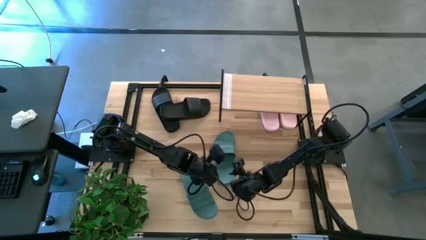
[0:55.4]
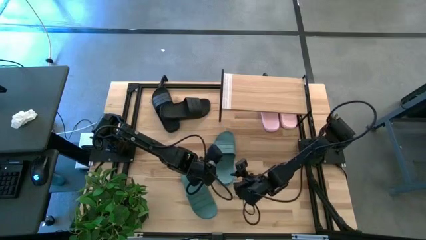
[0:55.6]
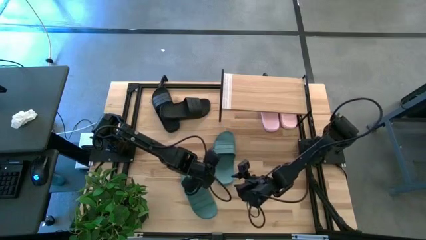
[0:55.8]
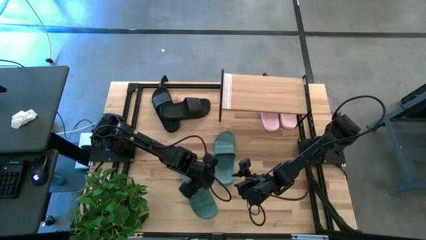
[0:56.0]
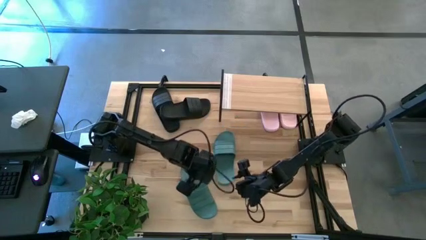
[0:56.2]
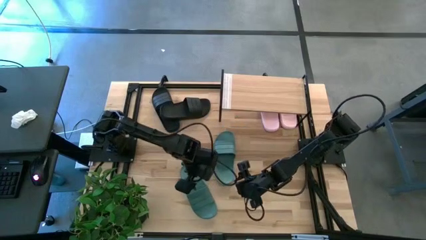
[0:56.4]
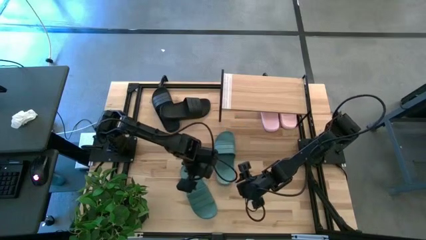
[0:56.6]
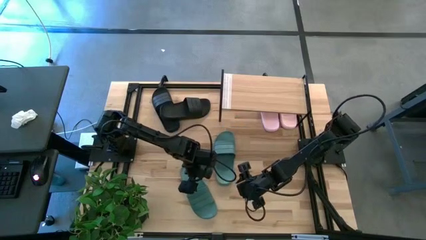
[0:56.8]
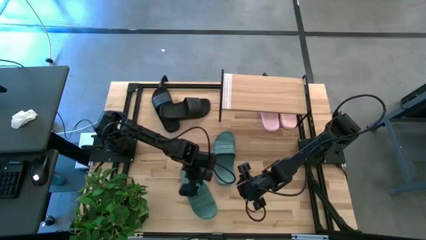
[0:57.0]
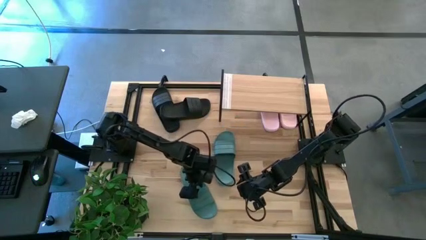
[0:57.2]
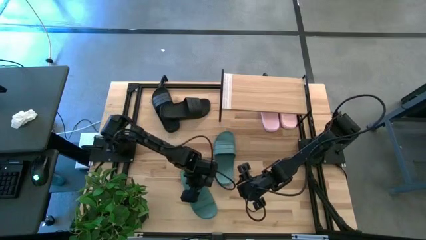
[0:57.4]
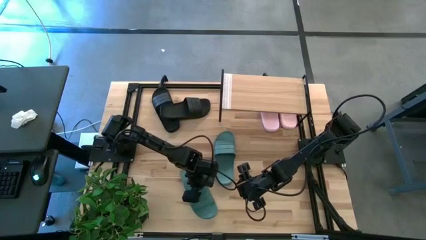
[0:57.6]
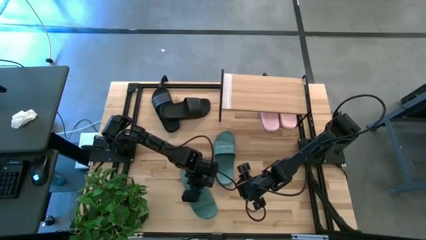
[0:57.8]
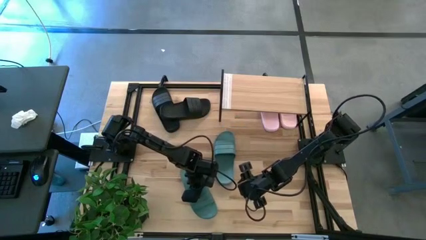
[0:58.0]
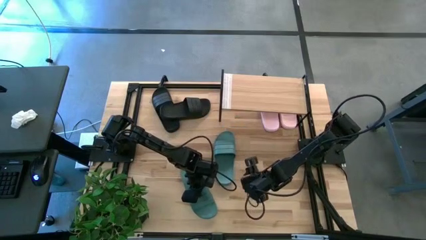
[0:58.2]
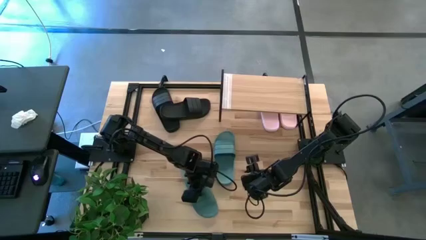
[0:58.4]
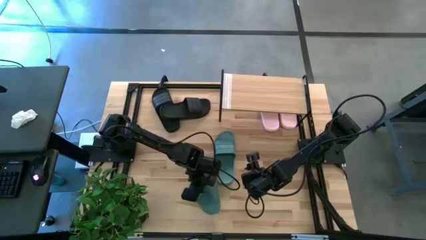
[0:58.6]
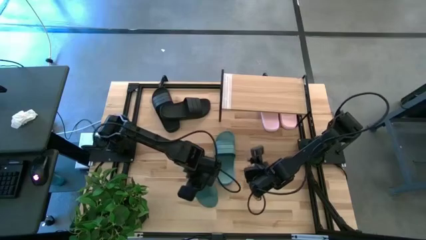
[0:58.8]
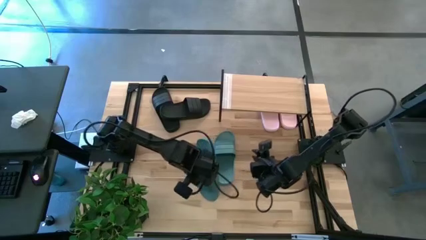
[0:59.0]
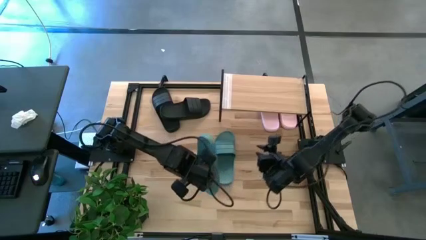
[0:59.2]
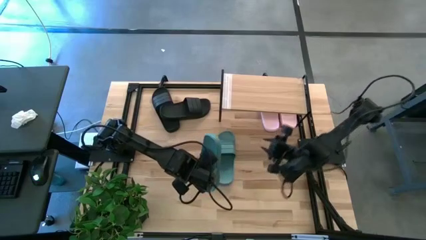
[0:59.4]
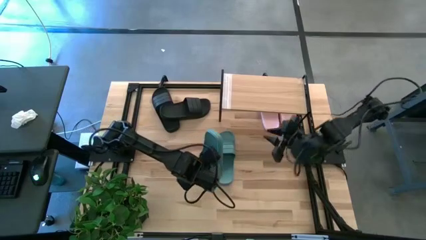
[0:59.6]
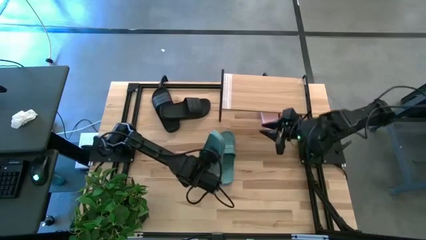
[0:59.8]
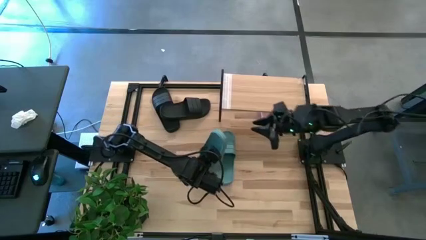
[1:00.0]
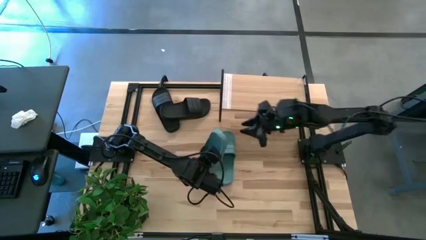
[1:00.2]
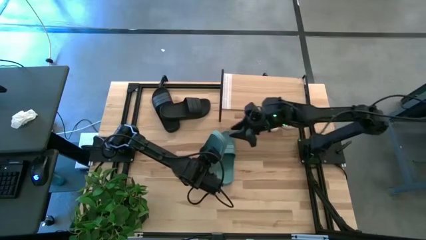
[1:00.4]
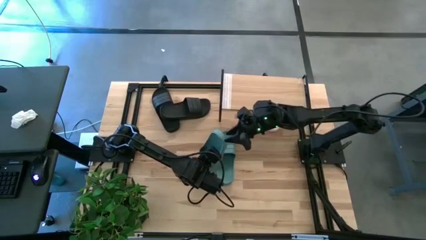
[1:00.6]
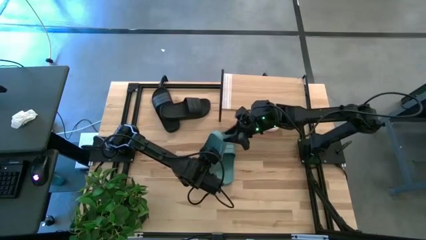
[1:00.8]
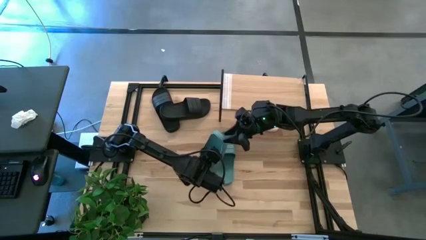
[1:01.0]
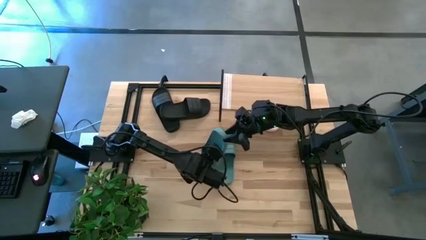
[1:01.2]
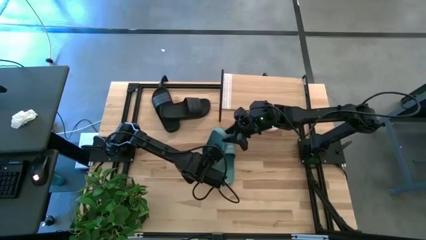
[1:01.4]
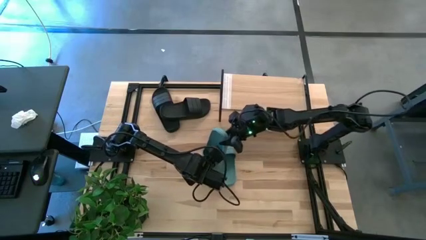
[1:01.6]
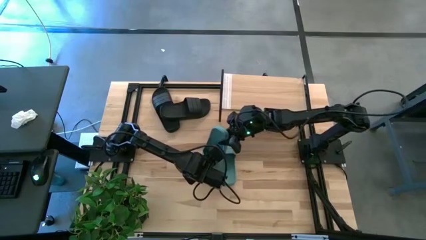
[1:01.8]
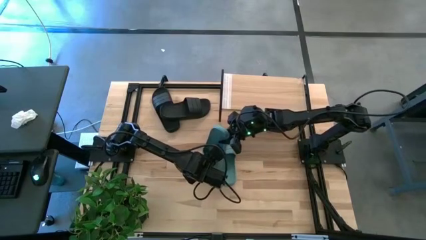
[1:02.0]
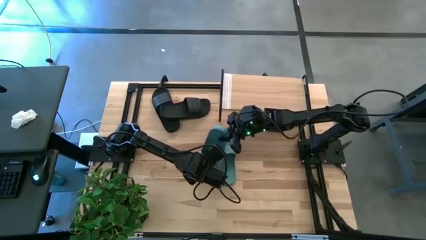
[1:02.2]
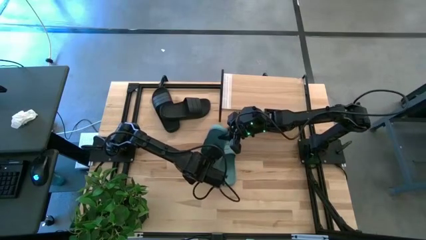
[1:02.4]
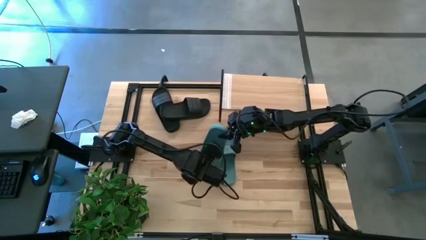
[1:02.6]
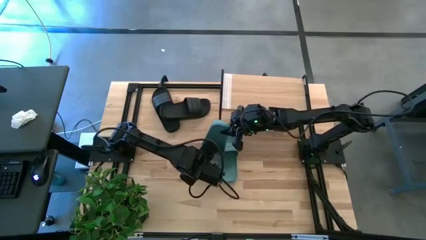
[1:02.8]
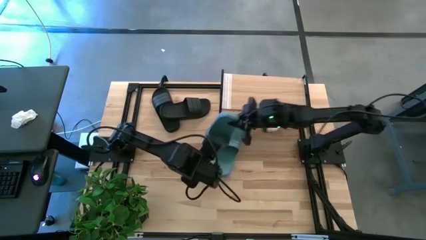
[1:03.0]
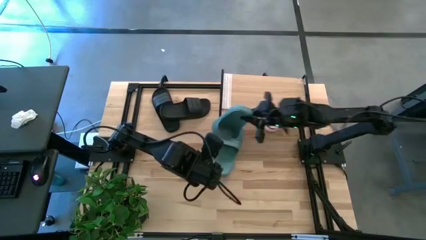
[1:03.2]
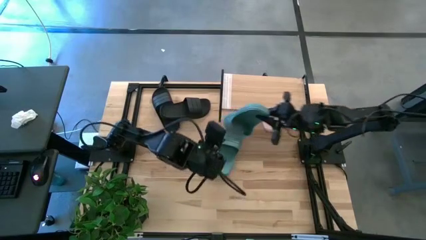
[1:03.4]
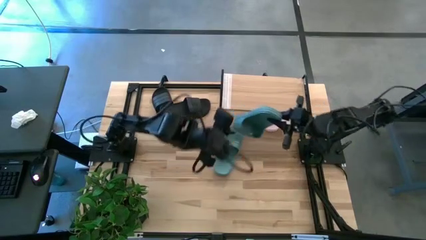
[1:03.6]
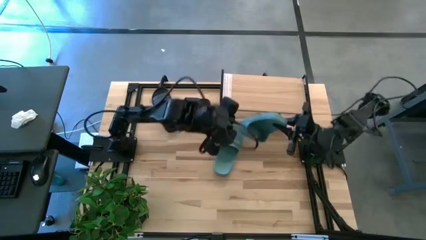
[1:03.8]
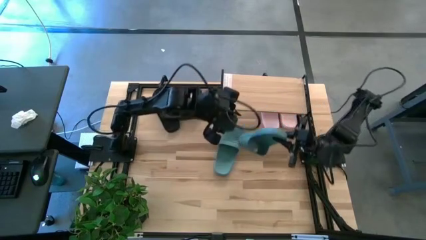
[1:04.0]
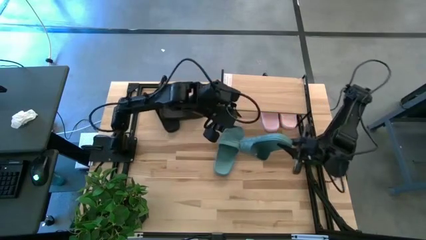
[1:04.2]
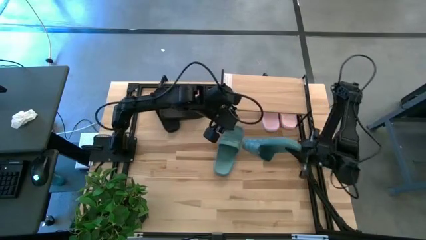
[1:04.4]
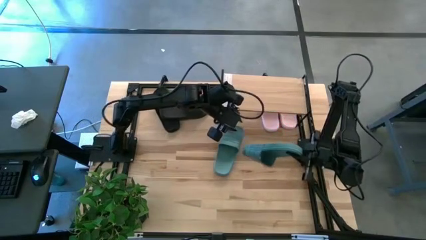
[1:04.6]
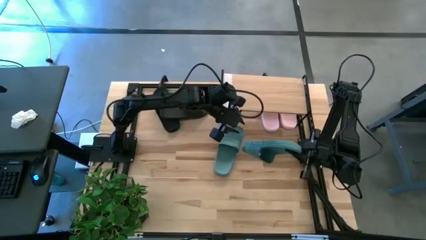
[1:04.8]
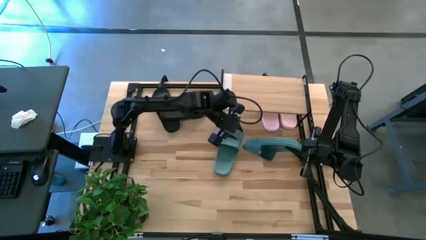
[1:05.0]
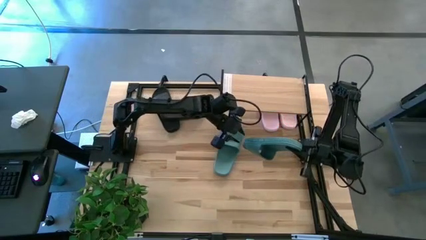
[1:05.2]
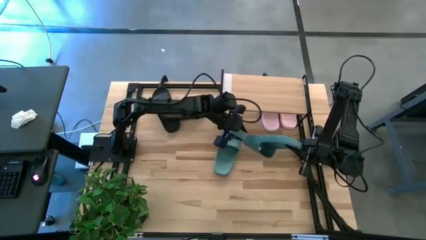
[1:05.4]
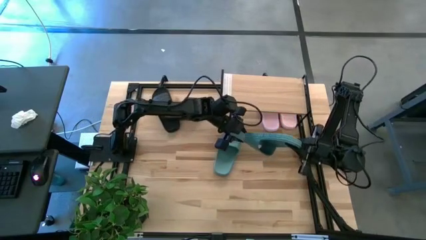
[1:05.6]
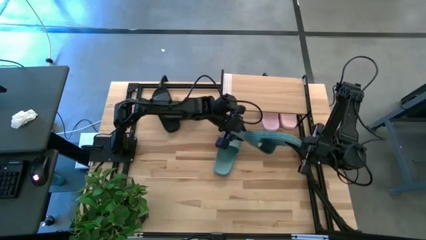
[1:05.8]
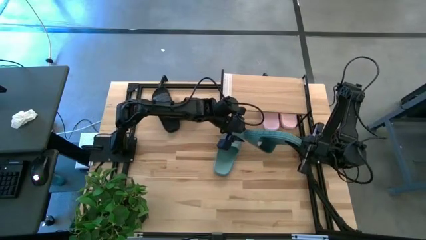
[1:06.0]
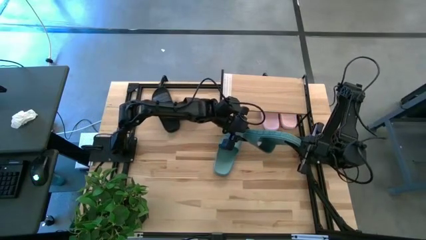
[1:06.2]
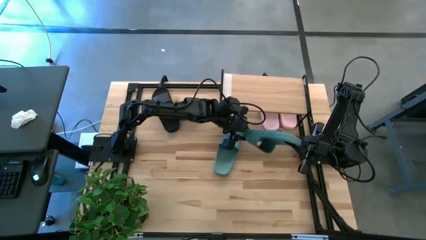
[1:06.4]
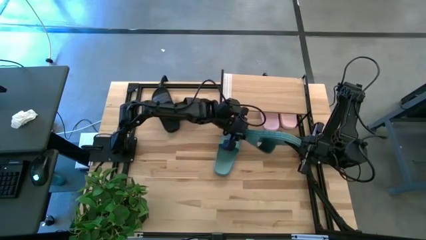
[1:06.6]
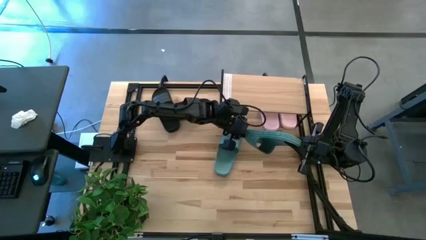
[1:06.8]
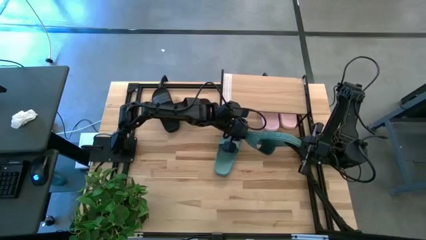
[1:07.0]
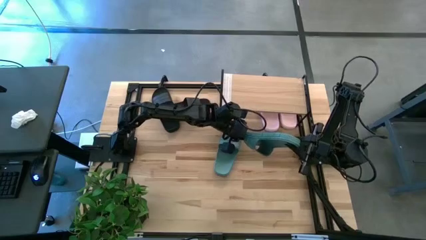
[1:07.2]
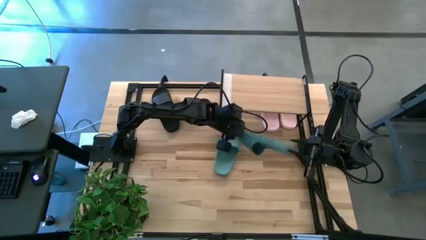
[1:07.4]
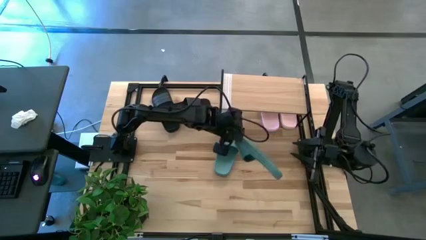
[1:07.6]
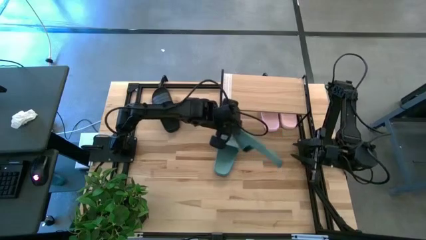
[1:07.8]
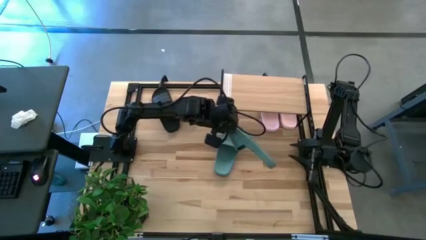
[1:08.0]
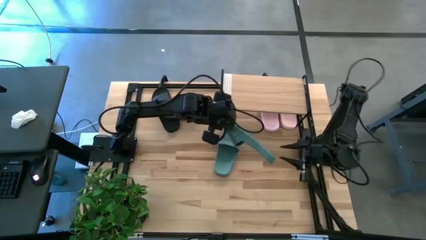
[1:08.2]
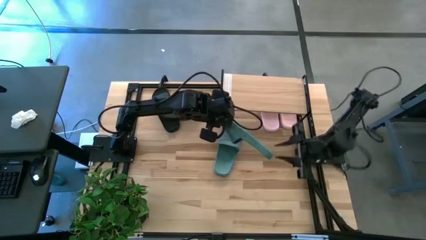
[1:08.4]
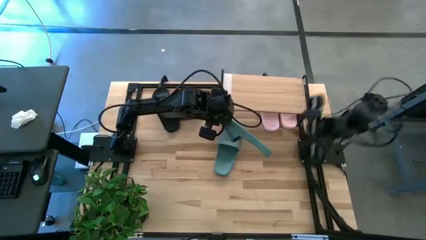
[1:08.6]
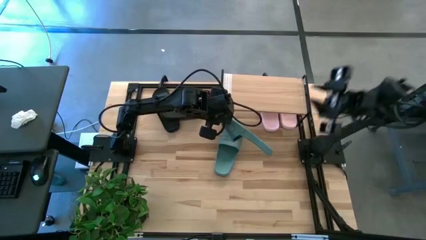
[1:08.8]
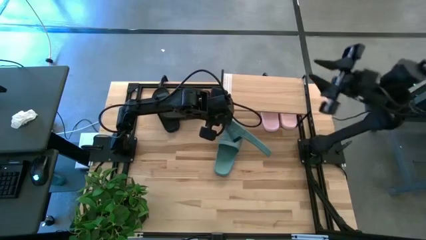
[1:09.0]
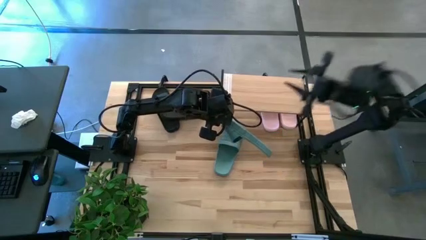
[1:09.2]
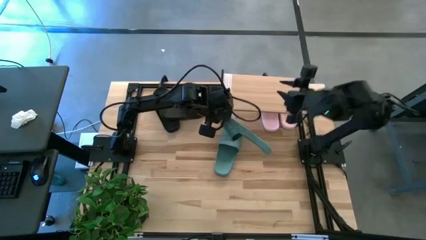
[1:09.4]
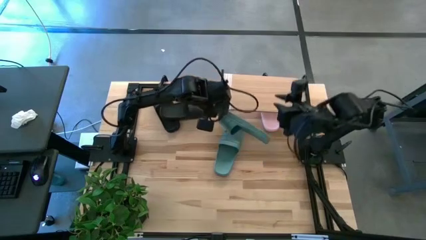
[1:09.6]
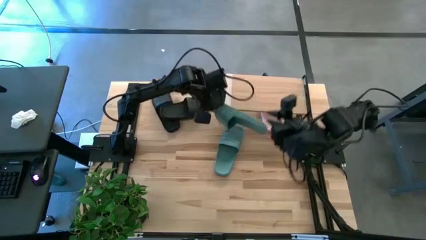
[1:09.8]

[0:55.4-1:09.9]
Task: Pick and place slides into the shelf
Put the left green slides under the shelf
